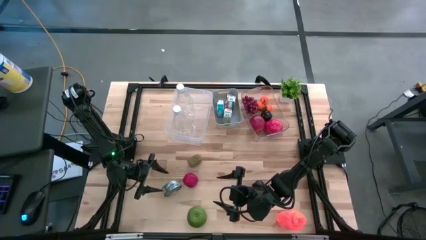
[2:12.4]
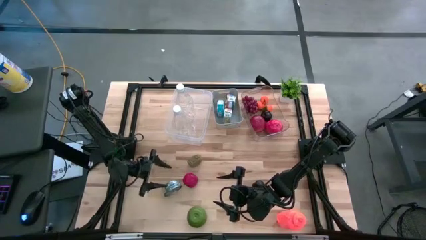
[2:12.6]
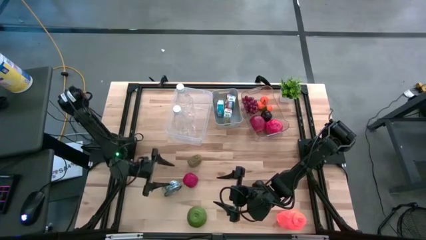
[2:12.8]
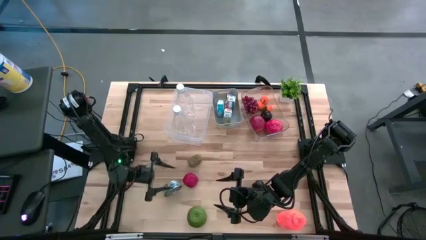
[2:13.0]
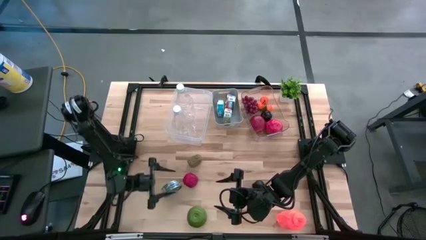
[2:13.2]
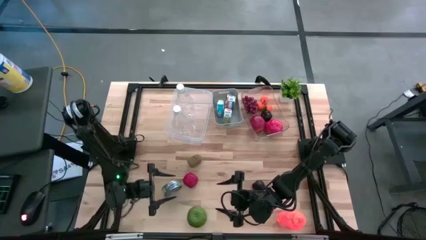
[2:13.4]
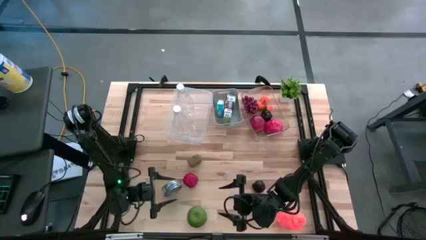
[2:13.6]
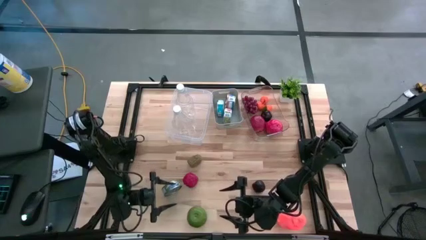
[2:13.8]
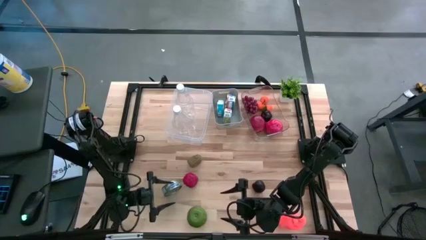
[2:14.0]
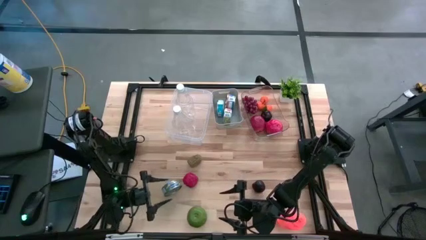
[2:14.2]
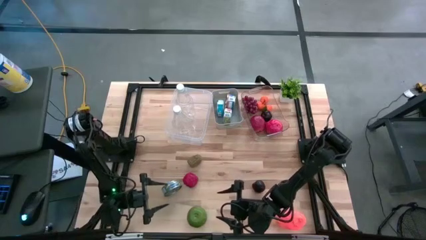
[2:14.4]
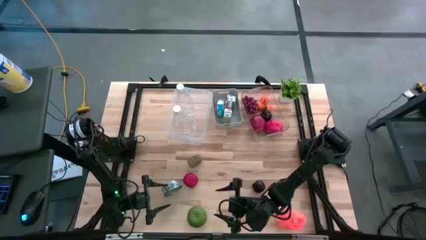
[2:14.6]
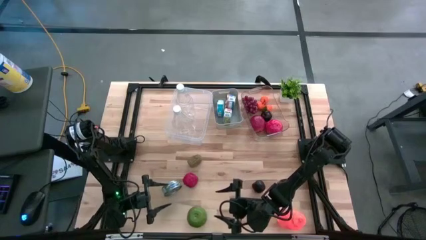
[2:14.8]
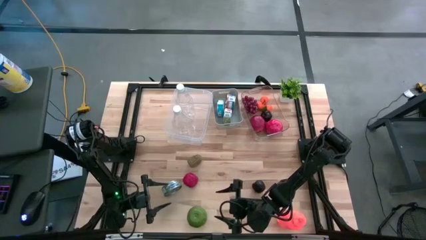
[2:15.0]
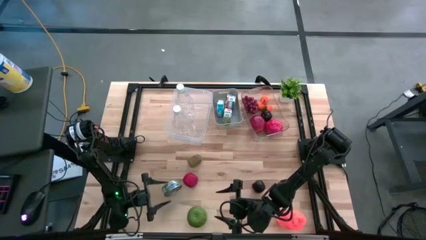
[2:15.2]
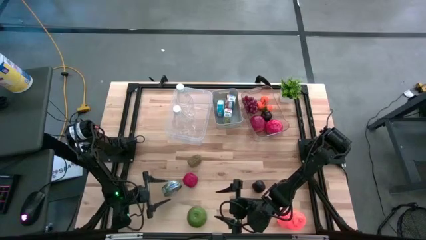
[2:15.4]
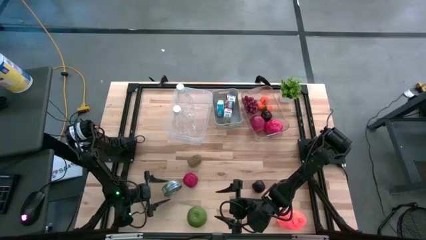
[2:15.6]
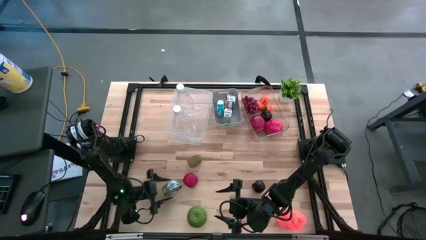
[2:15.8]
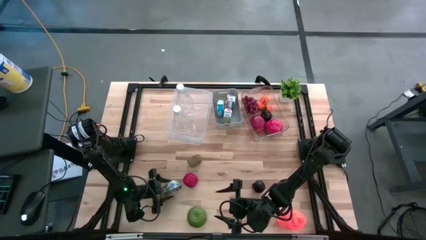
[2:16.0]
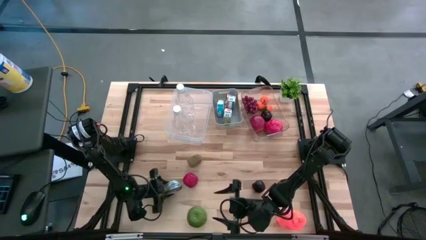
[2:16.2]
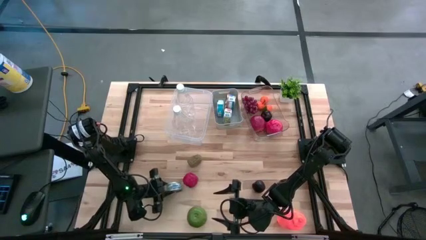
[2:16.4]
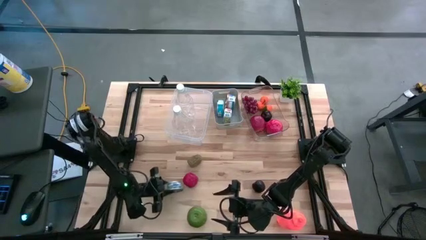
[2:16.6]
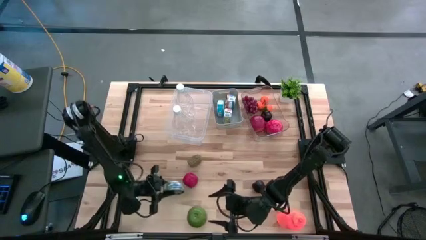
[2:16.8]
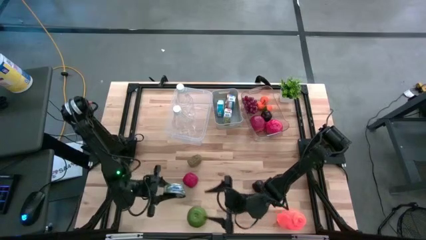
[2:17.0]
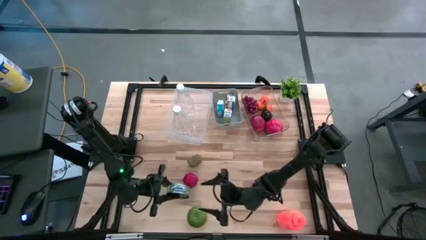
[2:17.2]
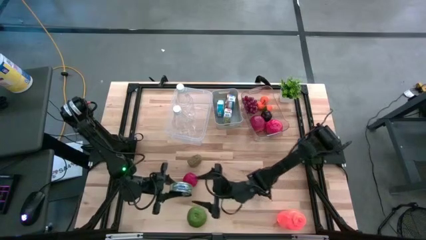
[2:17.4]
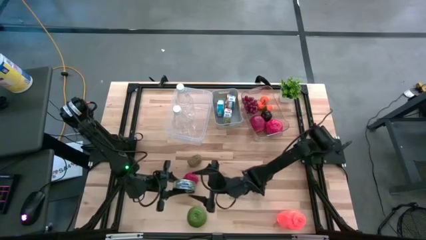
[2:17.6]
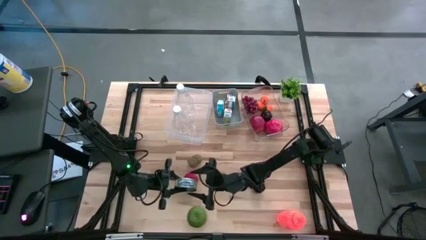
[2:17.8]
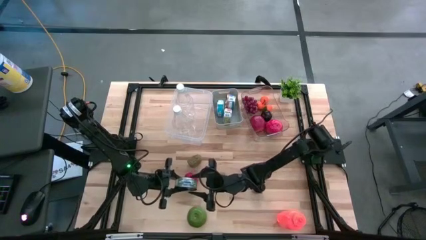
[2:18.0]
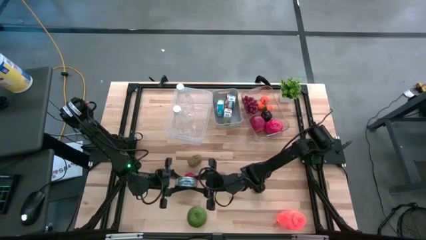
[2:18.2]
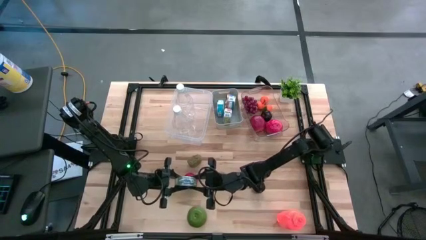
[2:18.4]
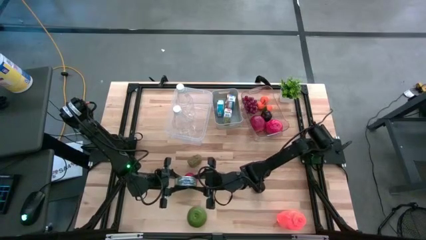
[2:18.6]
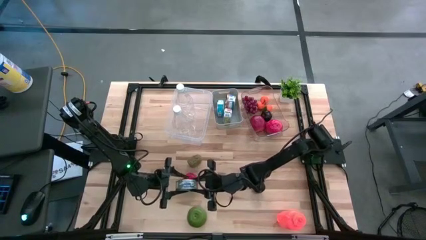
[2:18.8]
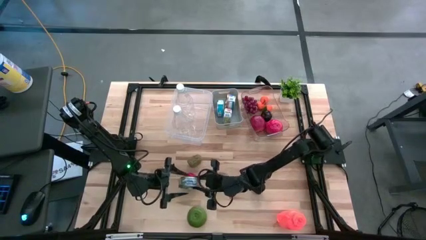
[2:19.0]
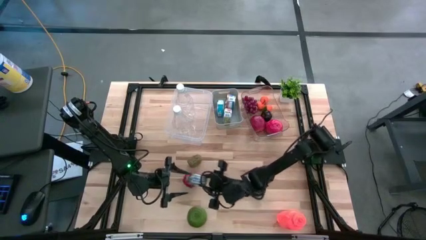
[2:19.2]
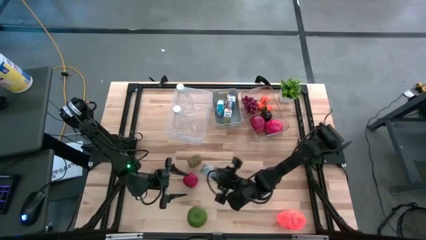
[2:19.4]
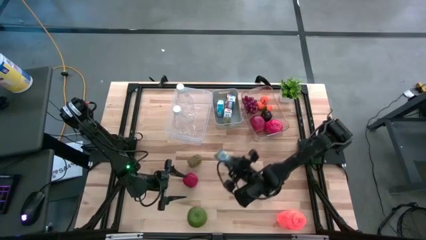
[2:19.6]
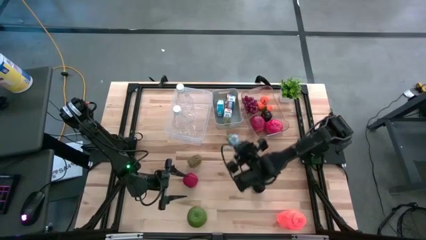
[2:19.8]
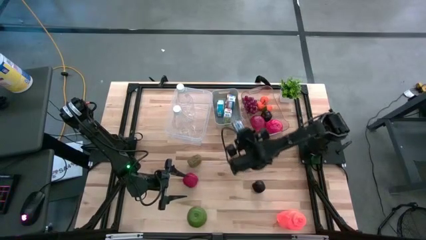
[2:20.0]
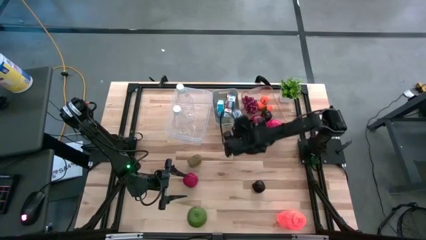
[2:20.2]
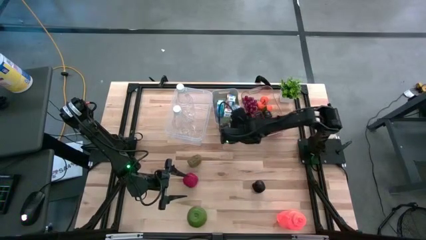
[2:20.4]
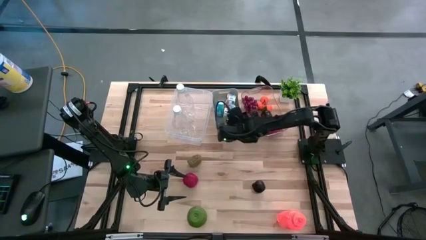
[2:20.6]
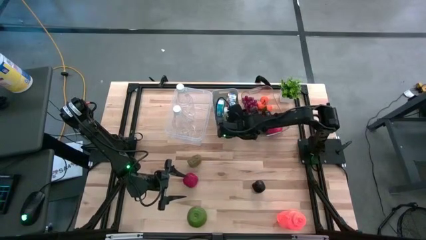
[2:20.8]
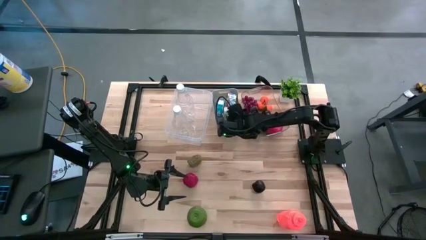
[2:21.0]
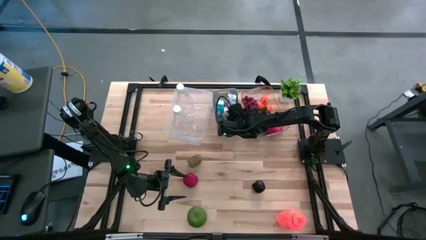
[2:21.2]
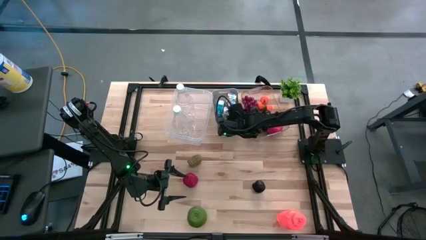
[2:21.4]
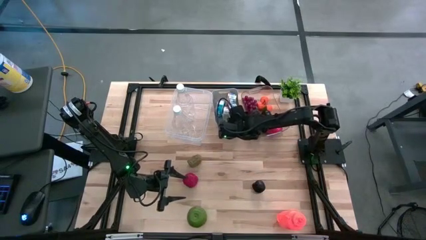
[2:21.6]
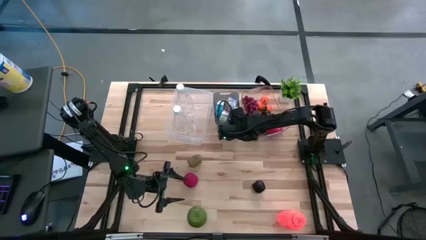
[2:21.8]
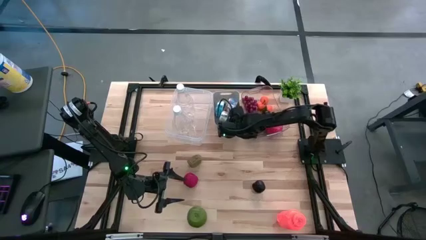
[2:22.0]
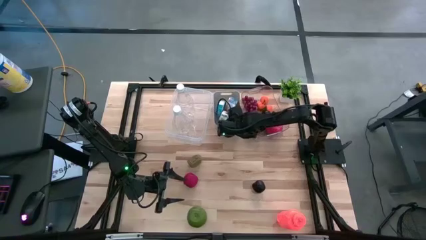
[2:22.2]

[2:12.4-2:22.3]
Task: Pick & Place Food Item
Put the green canned tuna into the white bin

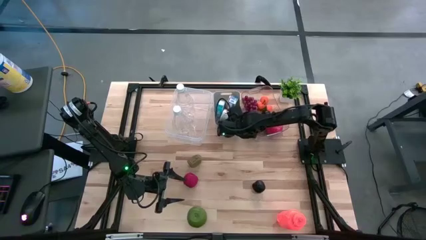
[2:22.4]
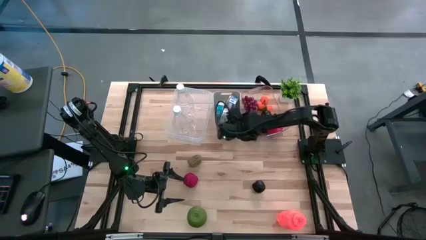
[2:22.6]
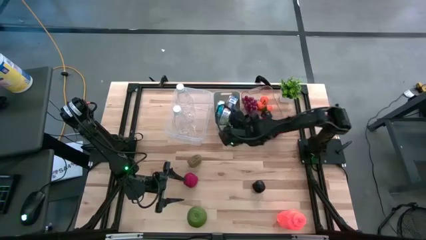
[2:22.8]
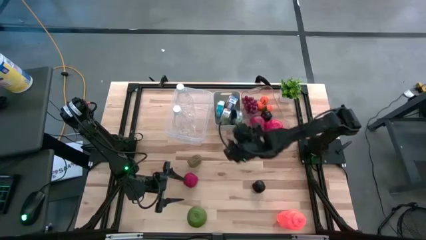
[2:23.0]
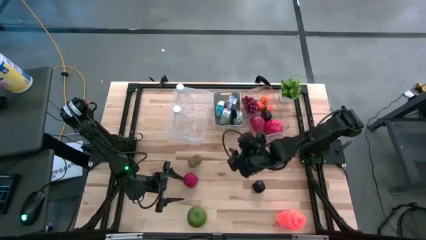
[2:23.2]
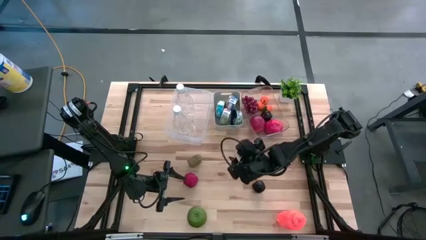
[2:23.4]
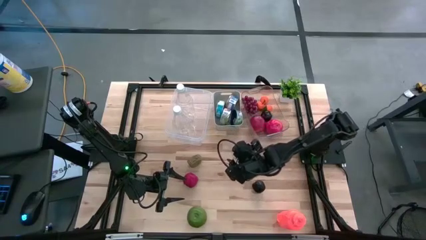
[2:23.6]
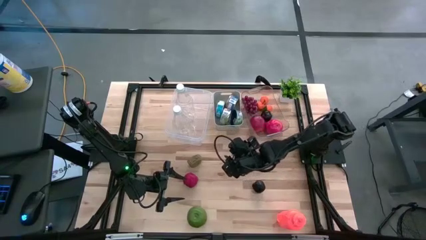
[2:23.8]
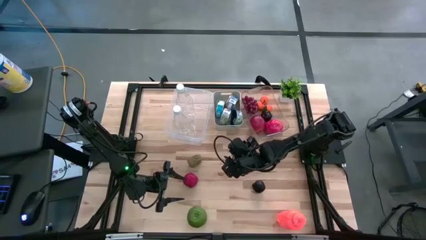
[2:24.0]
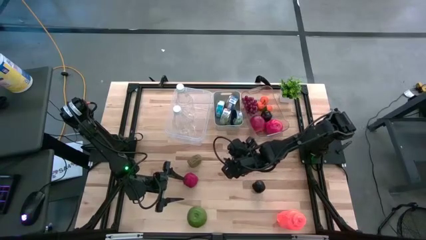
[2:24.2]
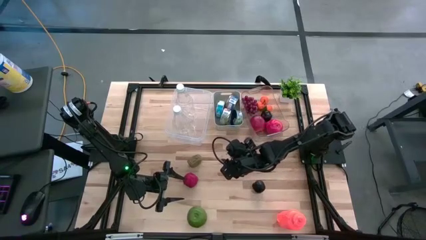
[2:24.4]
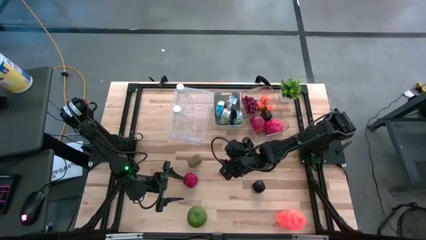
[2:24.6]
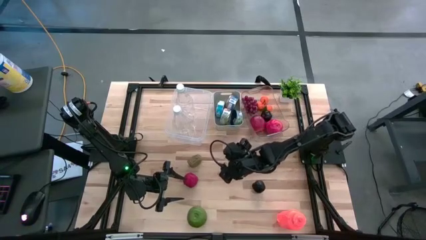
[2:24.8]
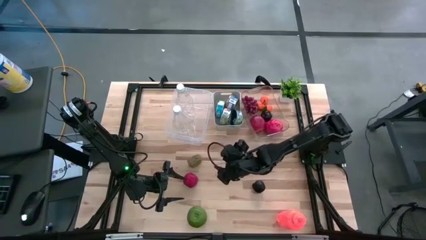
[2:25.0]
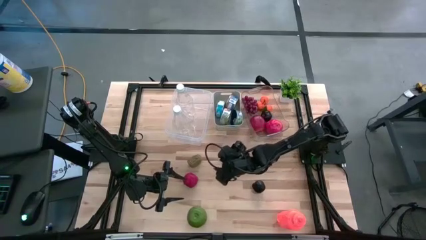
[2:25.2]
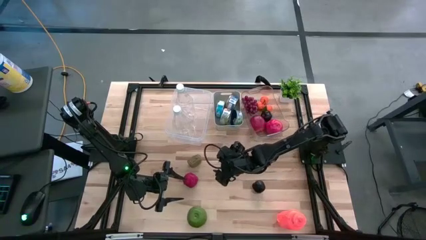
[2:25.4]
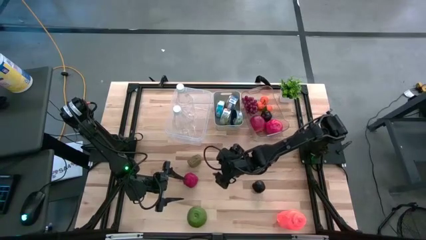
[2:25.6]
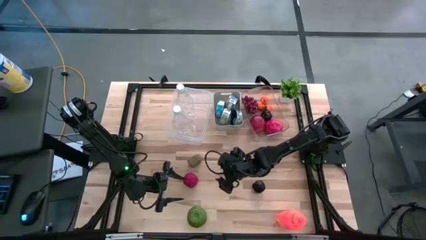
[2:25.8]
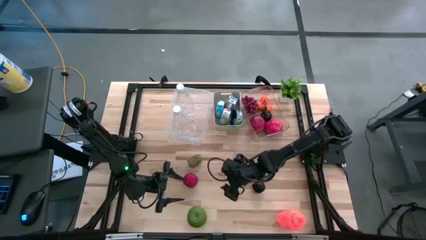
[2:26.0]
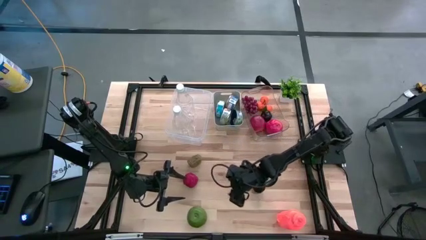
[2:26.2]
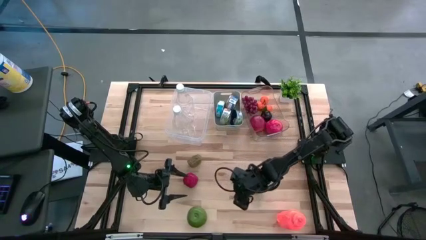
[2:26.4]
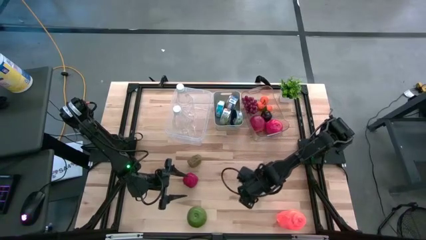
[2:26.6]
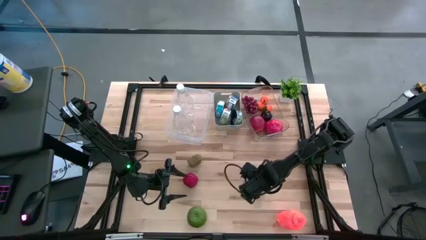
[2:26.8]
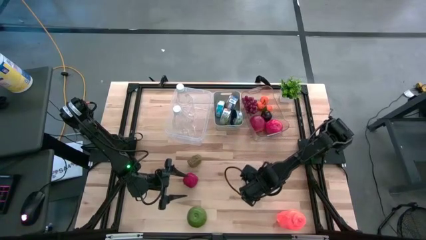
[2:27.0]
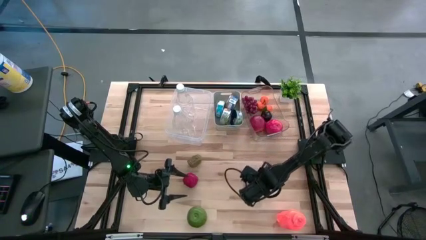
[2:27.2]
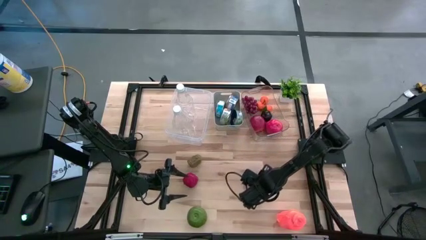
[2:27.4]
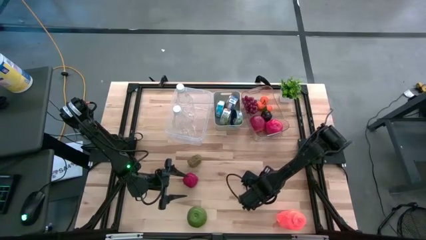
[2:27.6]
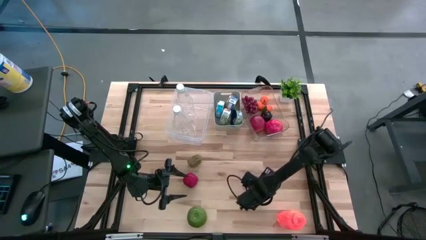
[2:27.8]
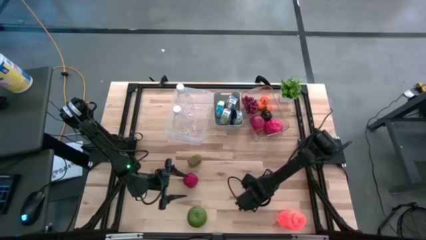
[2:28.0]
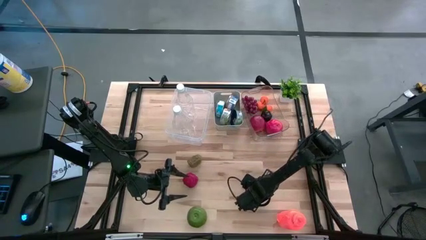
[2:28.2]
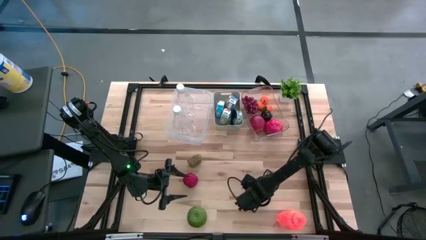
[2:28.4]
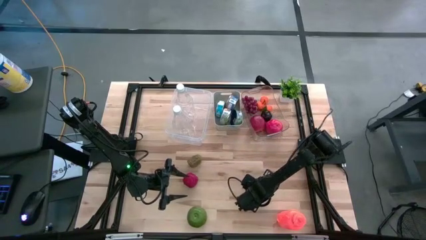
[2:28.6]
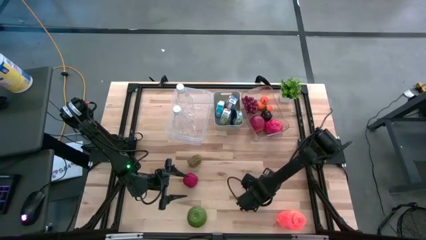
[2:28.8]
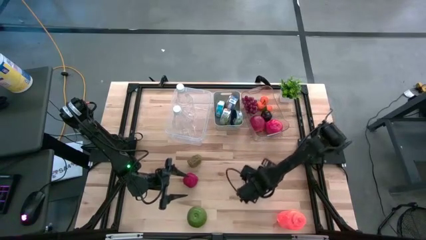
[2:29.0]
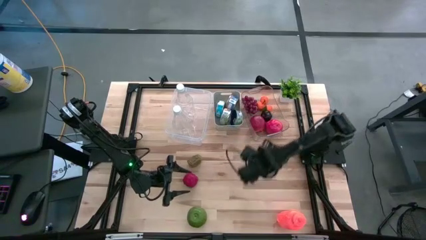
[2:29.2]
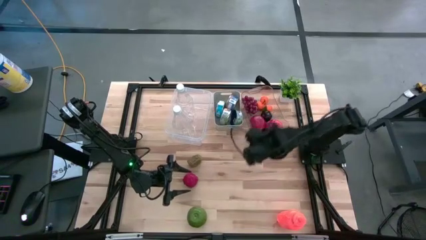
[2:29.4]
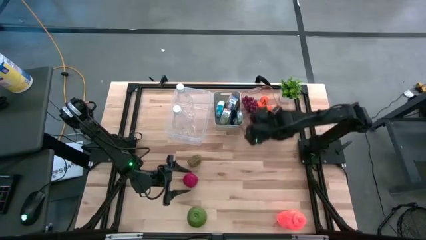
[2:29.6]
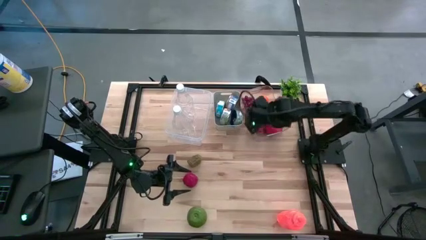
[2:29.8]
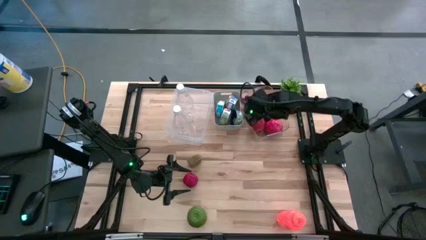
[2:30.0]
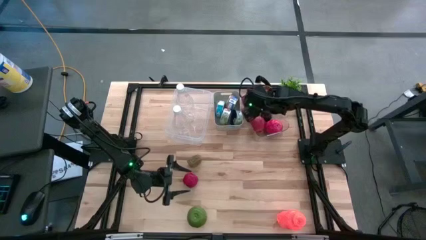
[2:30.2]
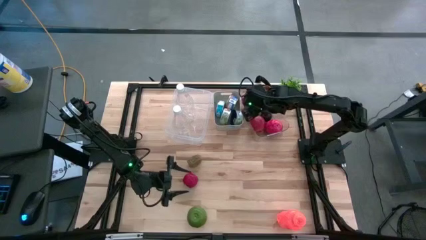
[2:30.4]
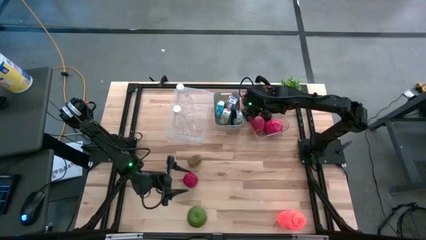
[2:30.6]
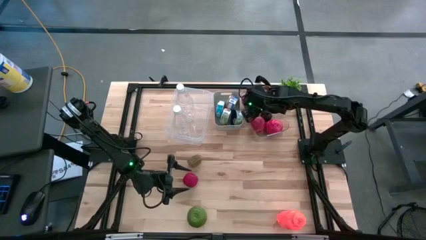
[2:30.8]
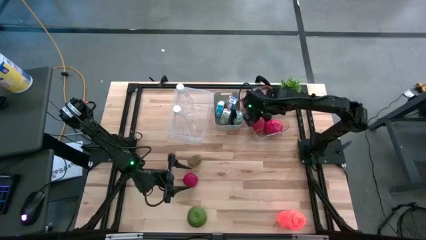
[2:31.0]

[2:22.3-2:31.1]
Put the plum into the right transparent bin
